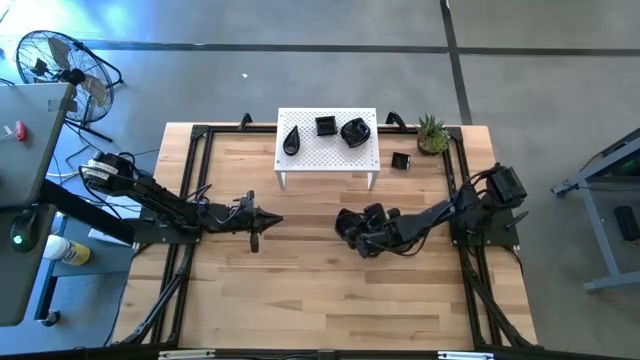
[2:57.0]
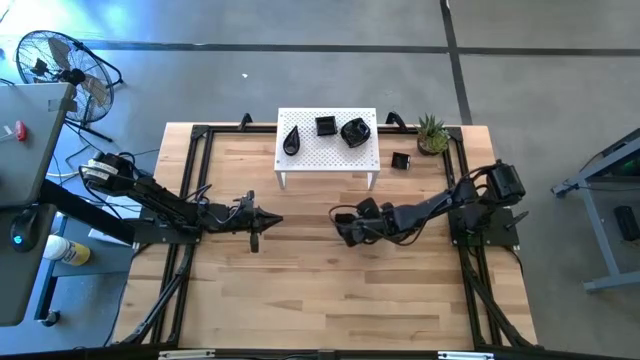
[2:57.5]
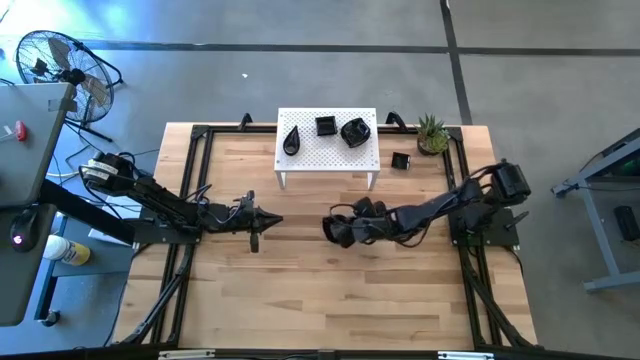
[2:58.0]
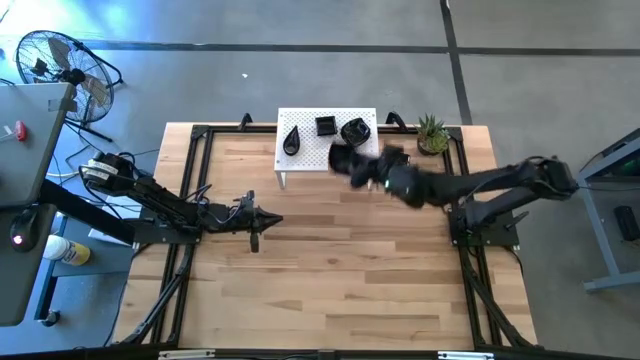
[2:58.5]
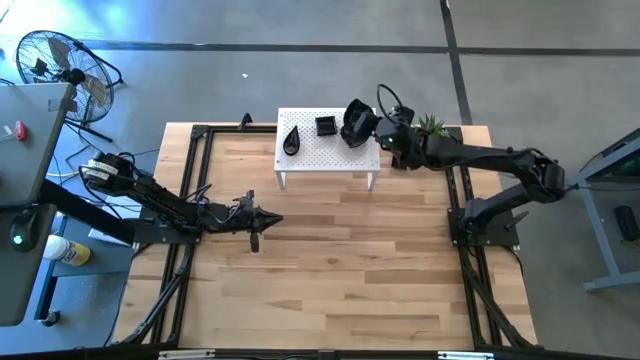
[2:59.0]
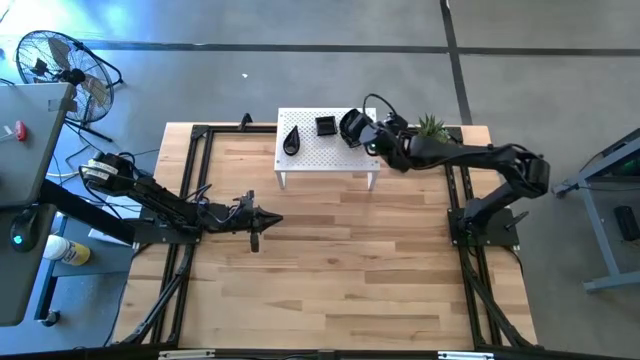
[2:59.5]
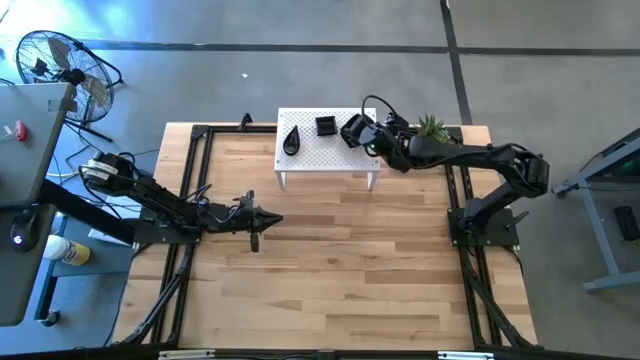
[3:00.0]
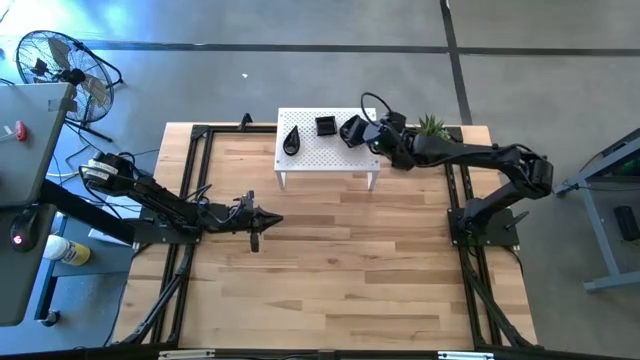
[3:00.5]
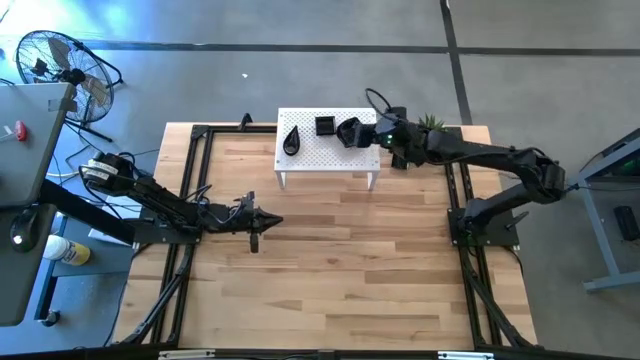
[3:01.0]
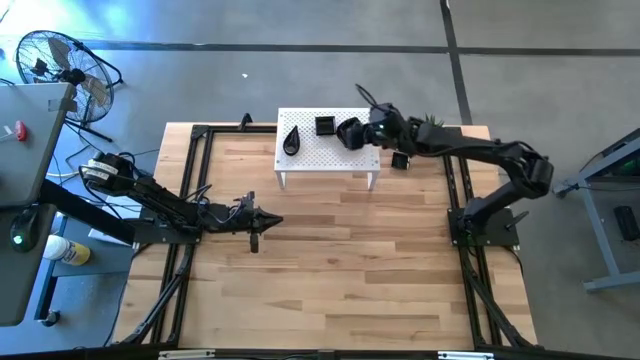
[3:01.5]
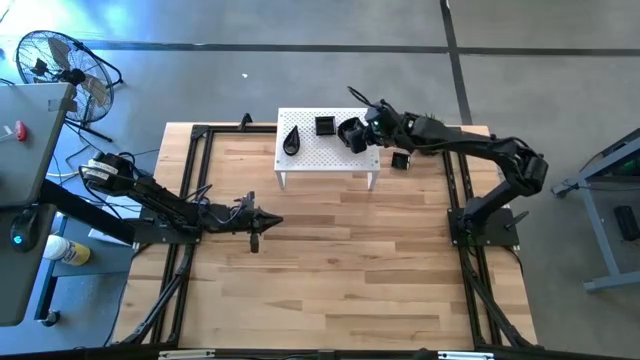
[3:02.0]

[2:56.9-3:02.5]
Task: Pick & Place Mini shaped plates
Stack the leaf shaped bowl on top of the leaf shaped bowls on the shelf

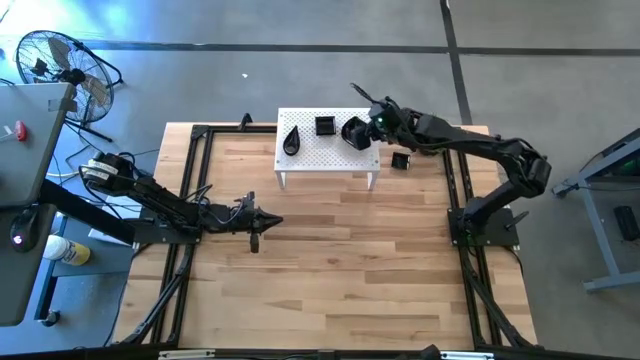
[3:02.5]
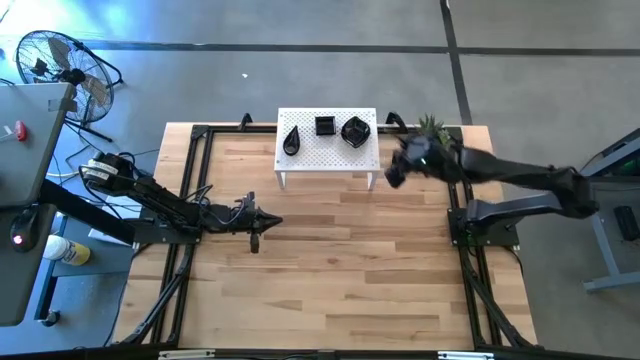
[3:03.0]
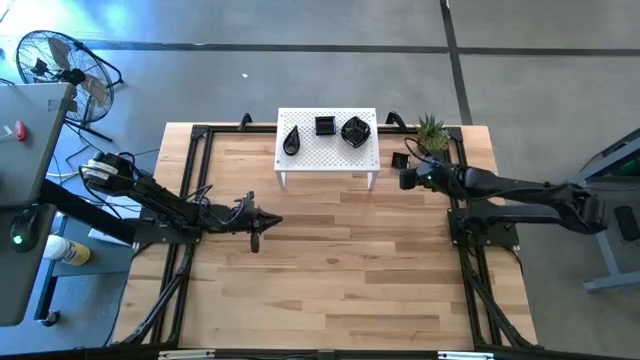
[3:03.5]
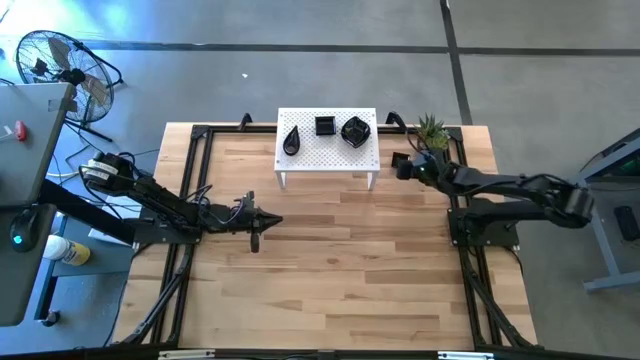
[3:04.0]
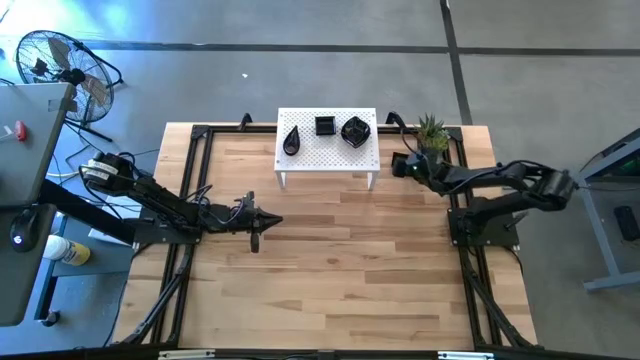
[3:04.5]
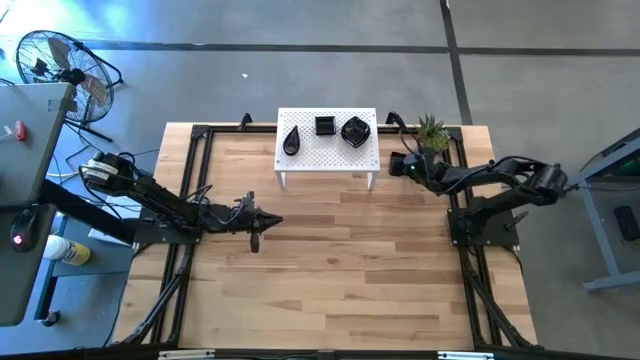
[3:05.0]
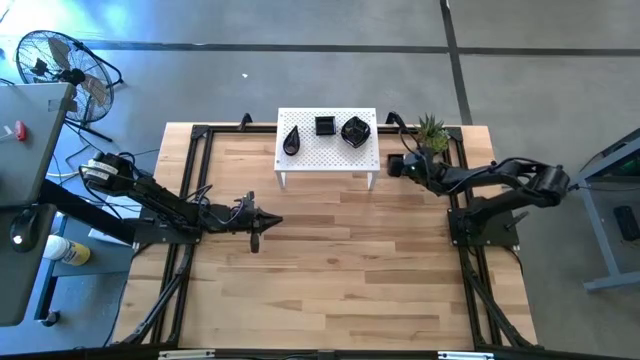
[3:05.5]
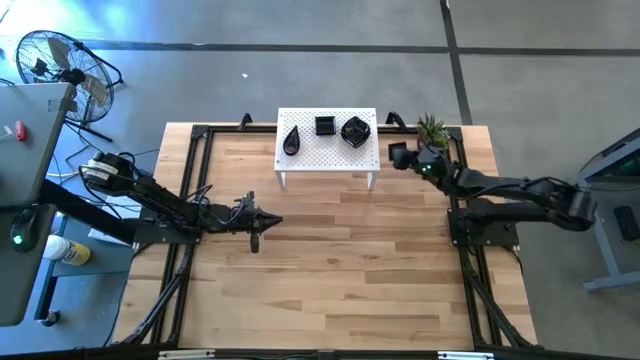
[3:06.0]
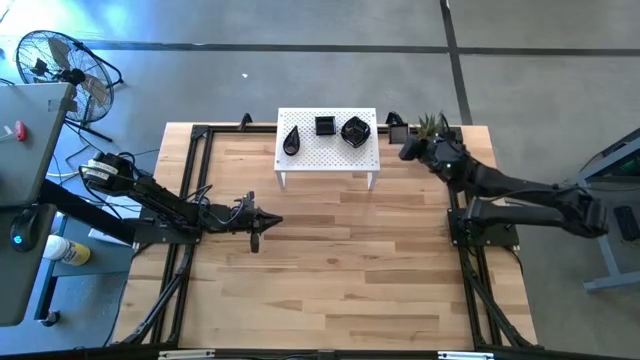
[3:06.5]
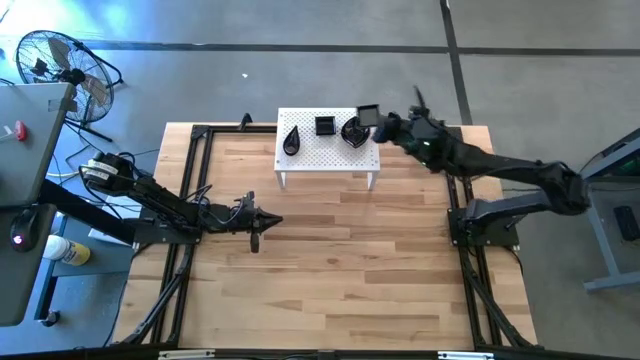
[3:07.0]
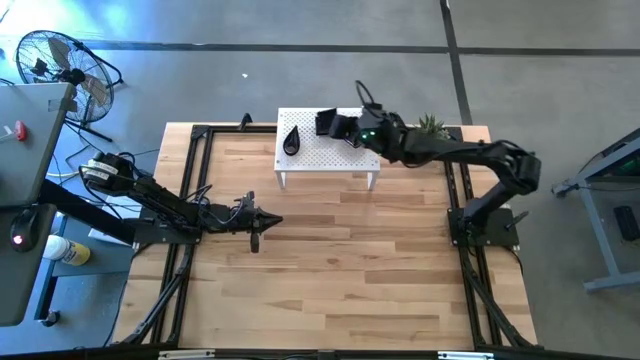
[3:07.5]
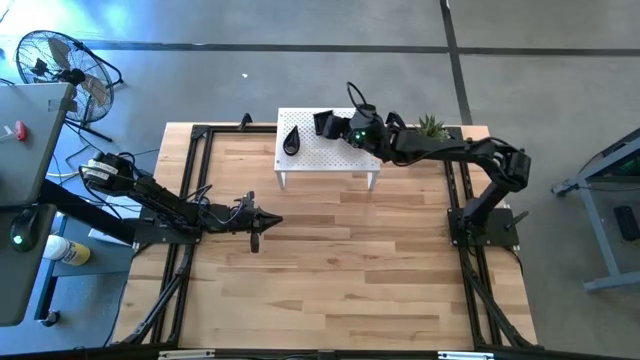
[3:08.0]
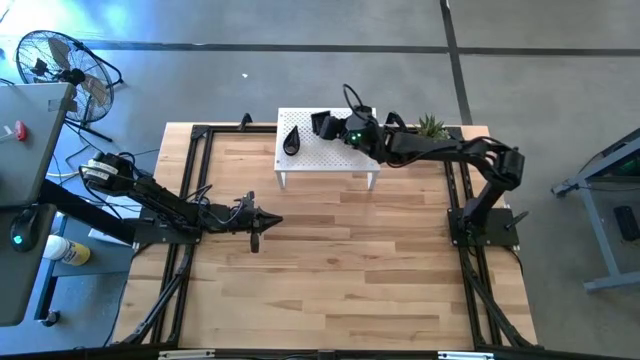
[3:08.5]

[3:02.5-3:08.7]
Stack the square bowl on top of the square bowls on the shelf

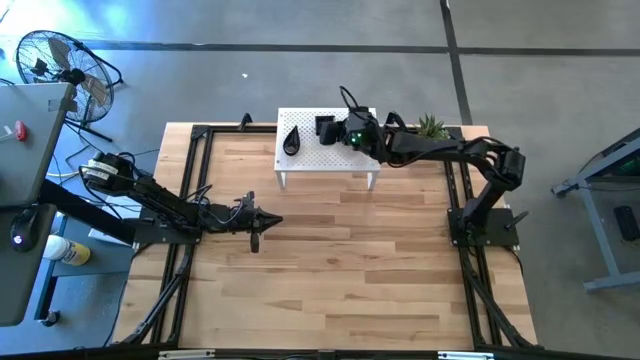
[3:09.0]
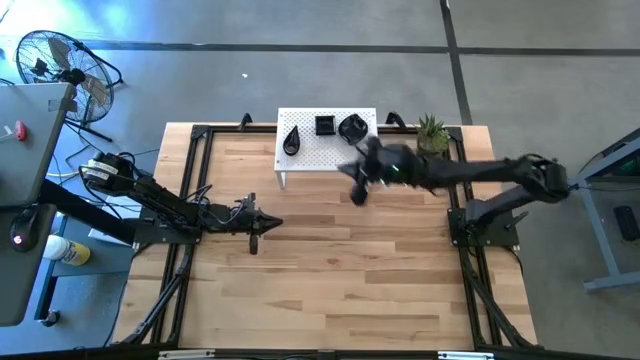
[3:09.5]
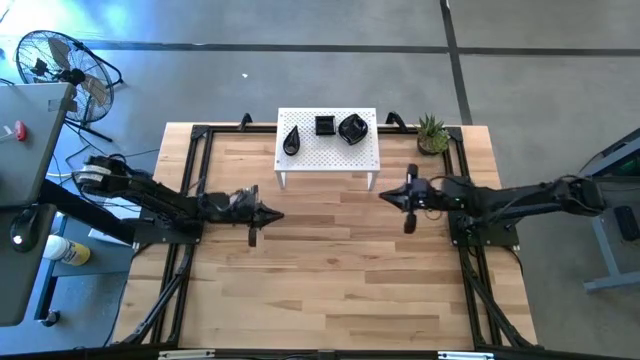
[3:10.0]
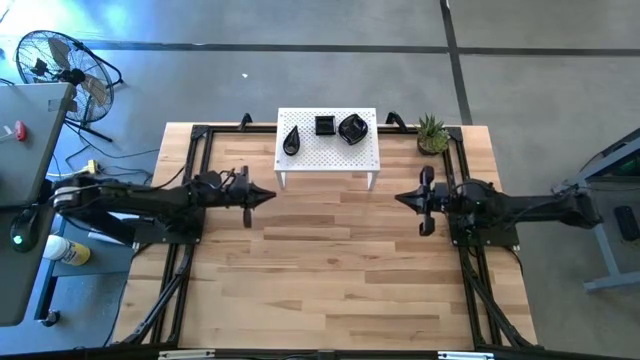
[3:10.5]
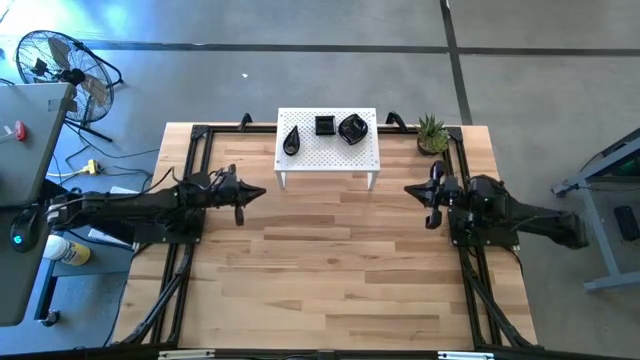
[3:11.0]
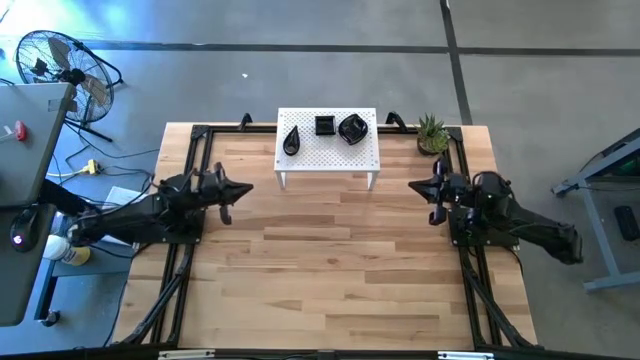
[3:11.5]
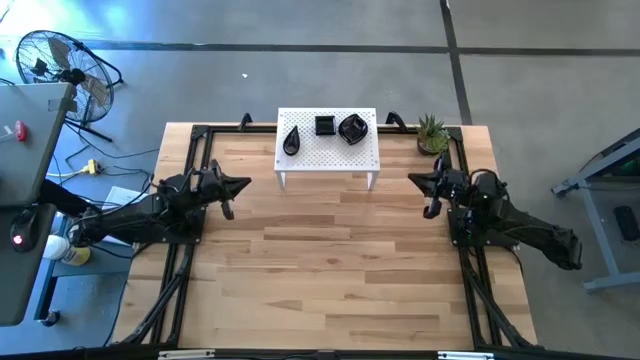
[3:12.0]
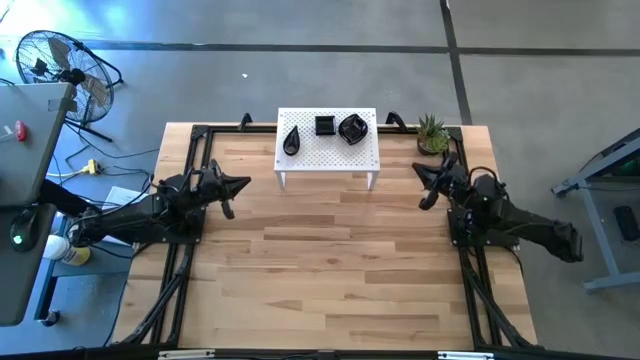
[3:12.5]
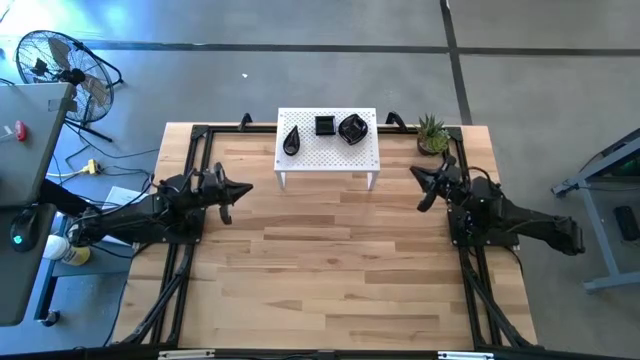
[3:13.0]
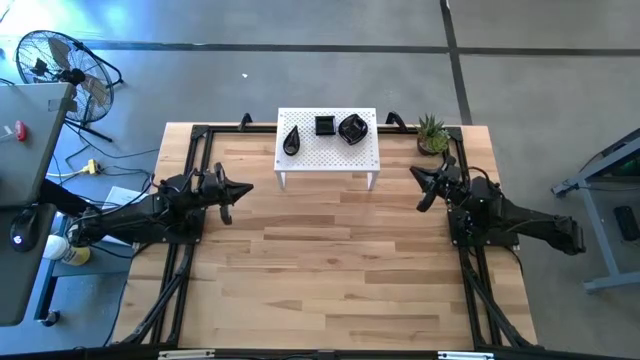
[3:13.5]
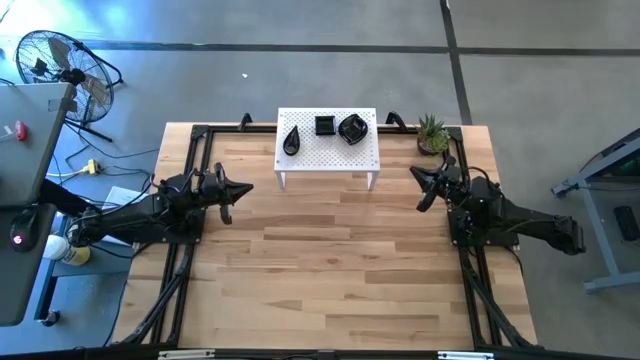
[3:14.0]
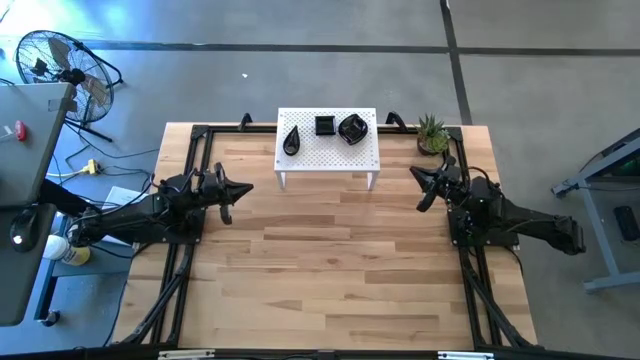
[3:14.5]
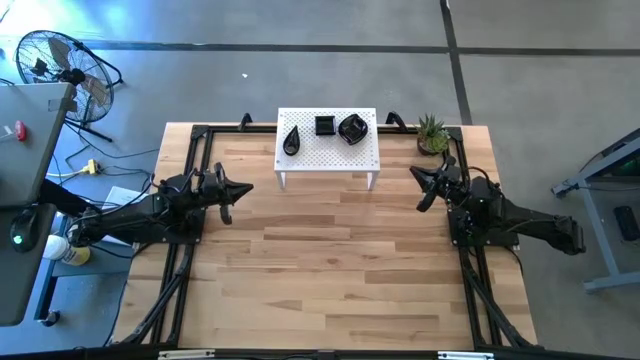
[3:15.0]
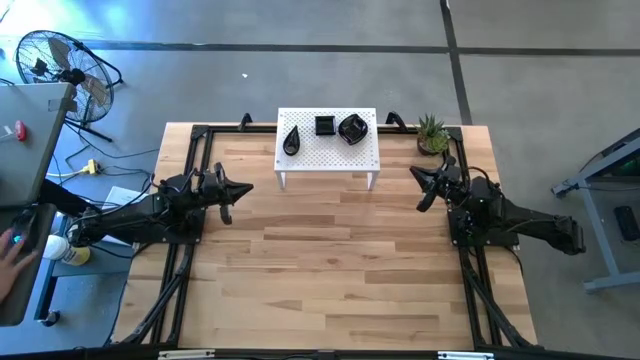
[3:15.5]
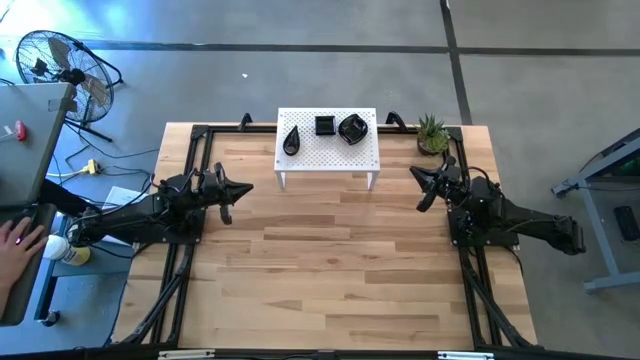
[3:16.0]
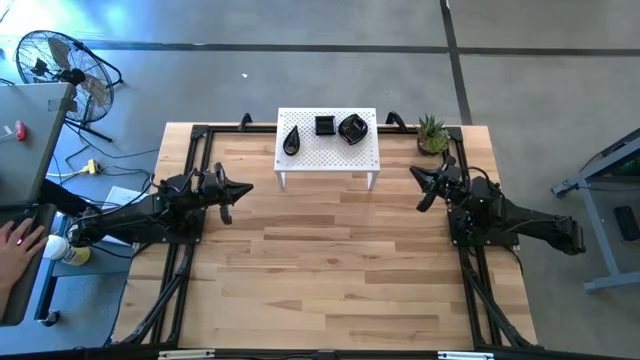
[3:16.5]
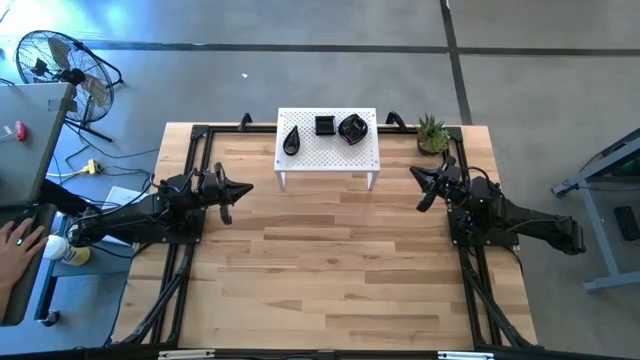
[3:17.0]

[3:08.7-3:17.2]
Return to Home Position

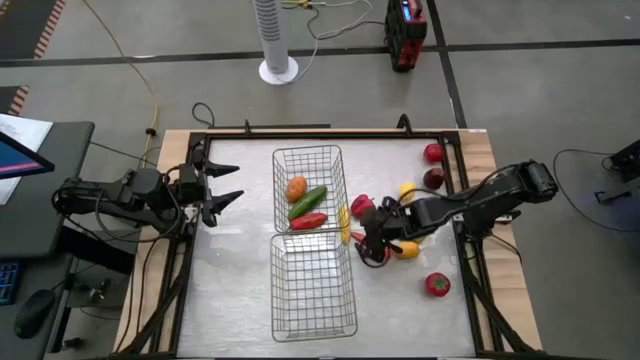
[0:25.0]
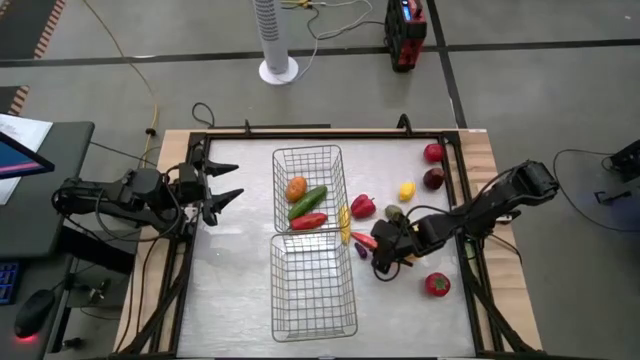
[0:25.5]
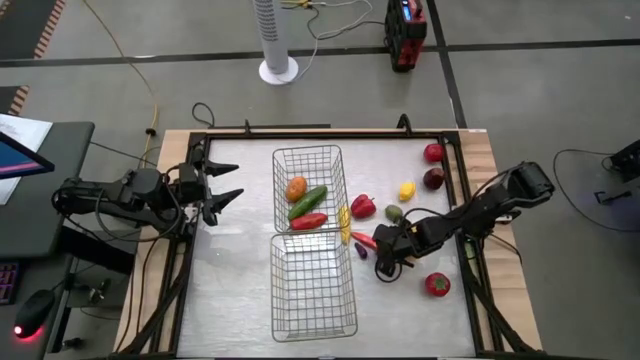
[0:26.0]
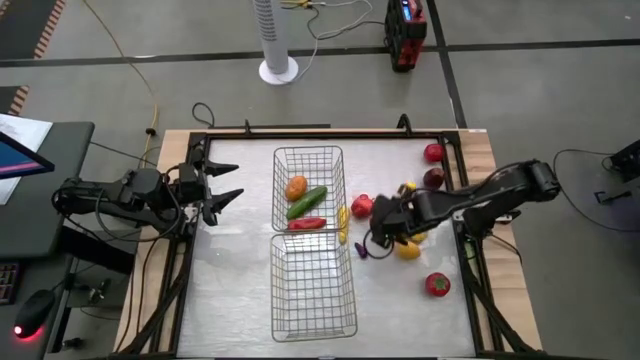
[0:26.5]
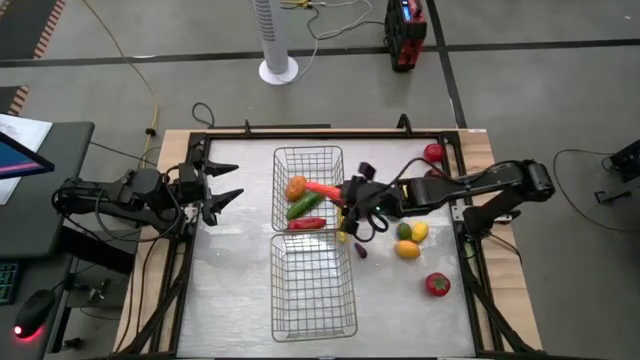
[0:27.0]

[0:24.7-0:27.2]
Task: Sort produce into baskets
Put the carrot into the top wire basket
